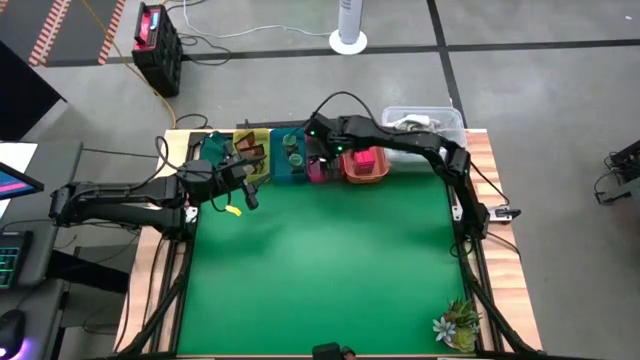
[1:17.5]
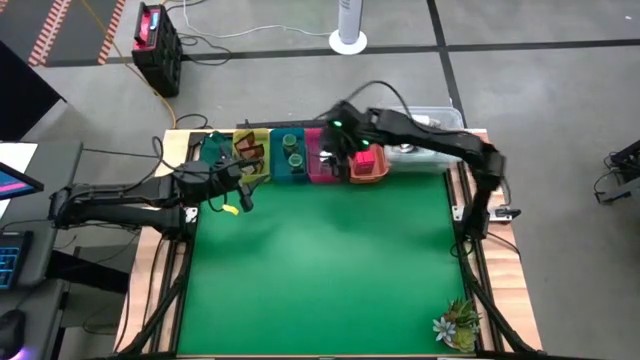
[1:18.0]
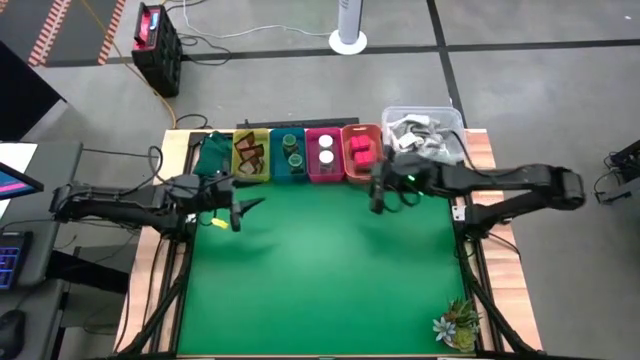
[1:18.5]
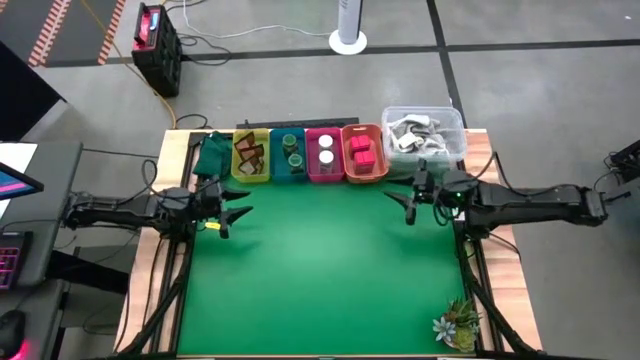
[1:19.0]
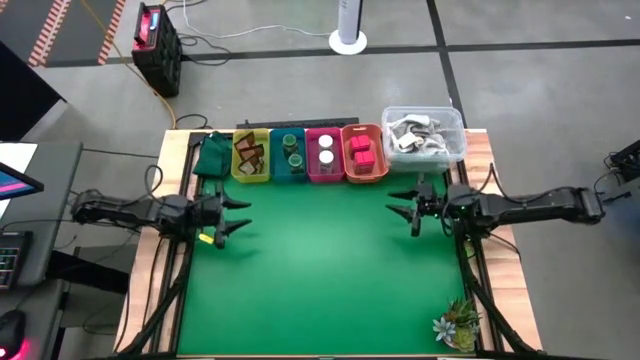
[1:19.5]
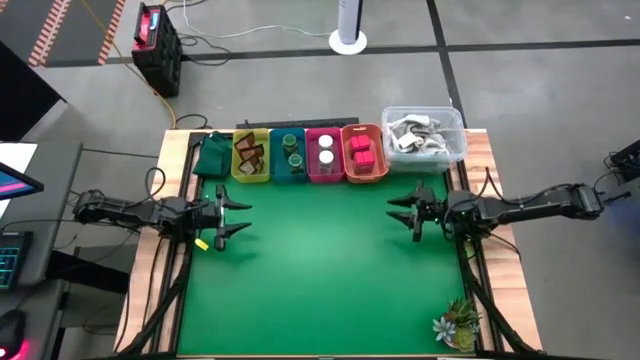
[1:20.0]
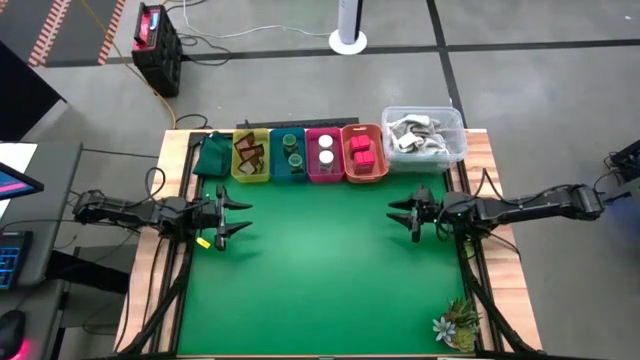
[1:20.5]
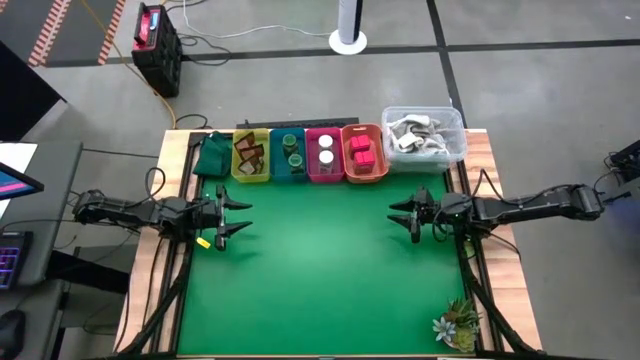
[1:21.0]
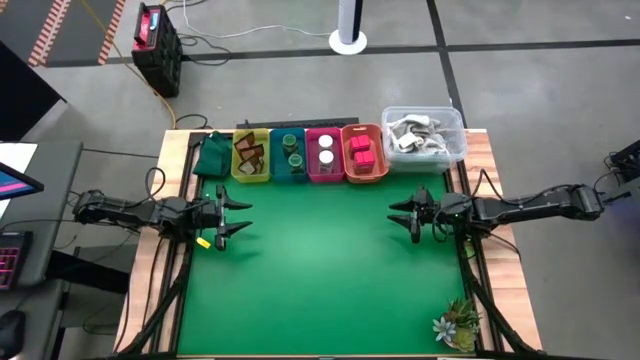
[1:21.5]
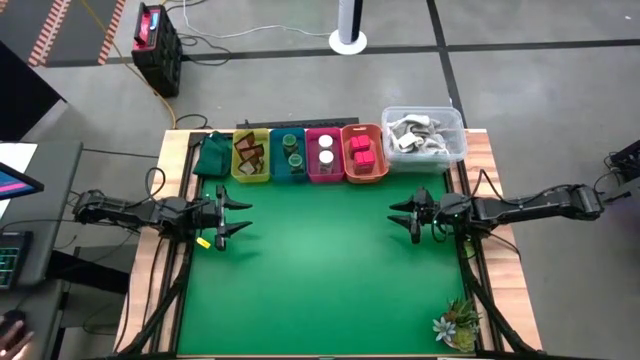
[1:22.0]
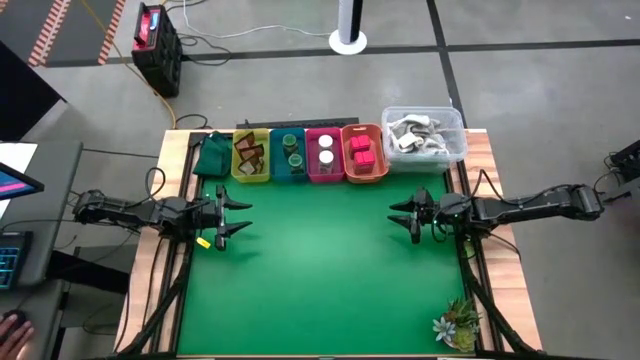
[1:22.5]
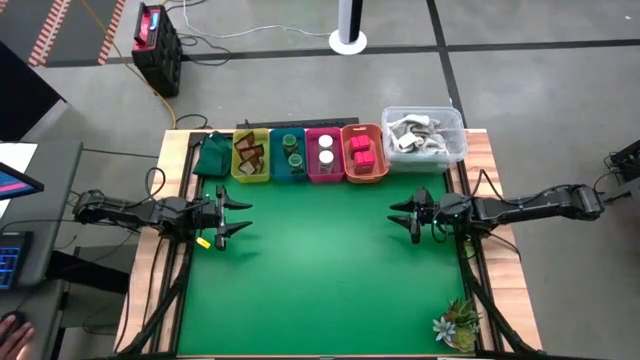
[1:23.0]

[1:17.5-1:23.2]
Task: Sort spices by type
Return to Home Position

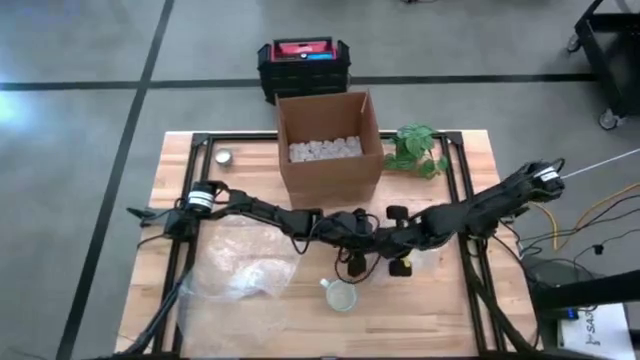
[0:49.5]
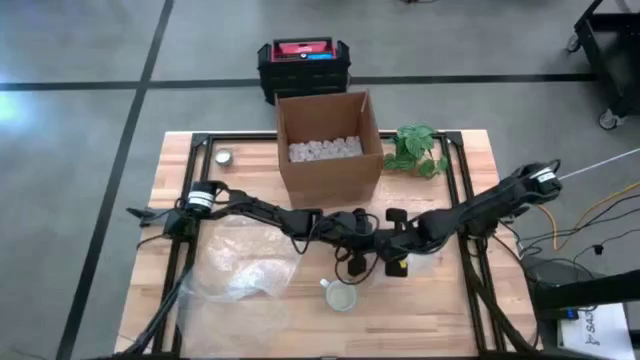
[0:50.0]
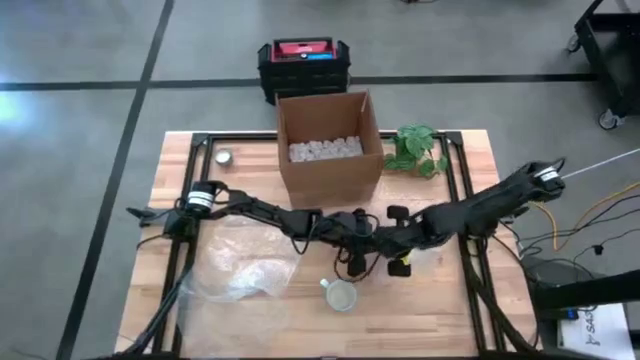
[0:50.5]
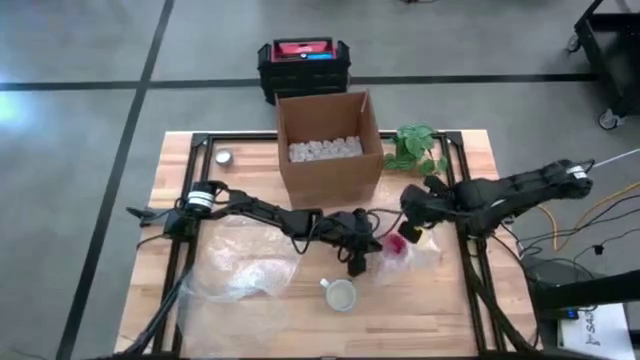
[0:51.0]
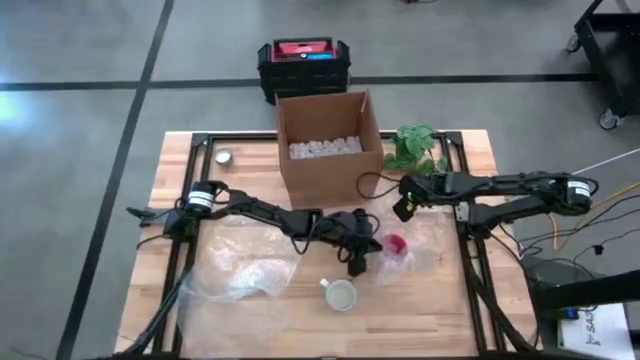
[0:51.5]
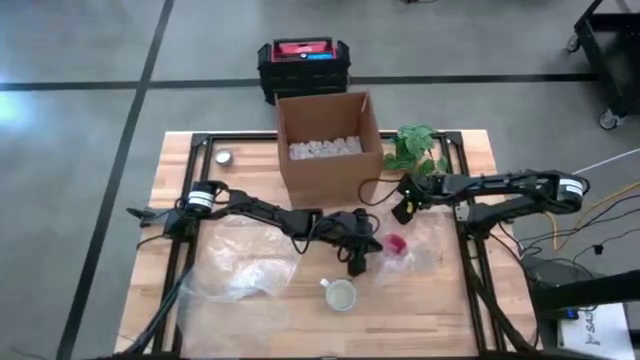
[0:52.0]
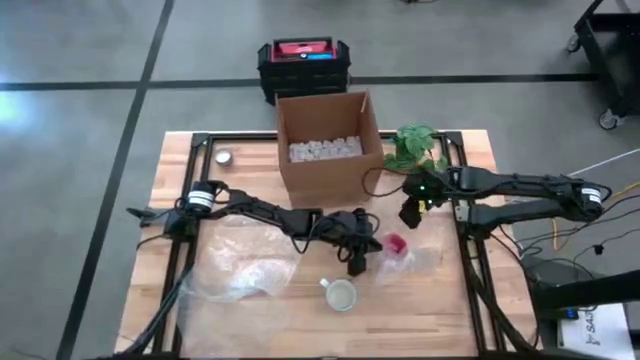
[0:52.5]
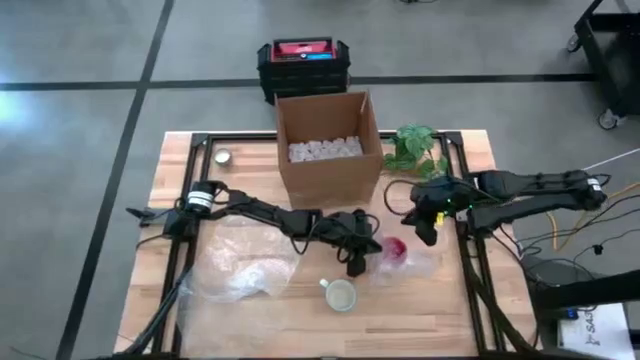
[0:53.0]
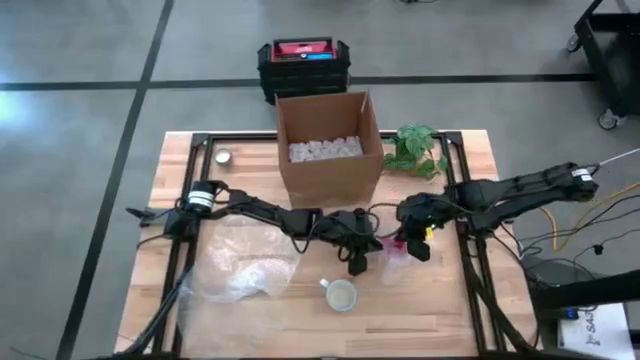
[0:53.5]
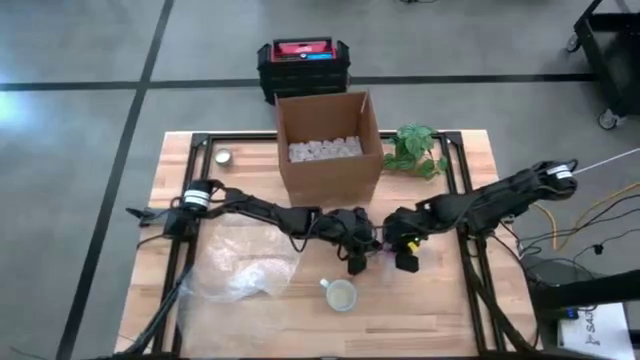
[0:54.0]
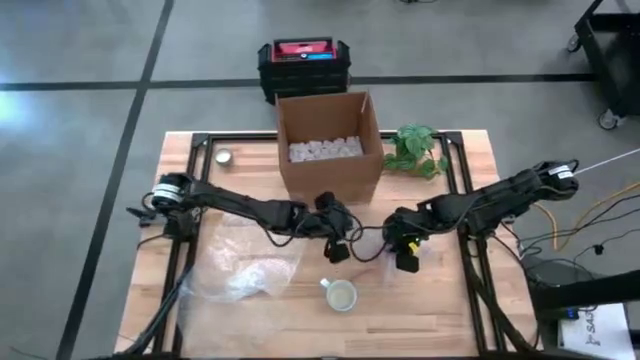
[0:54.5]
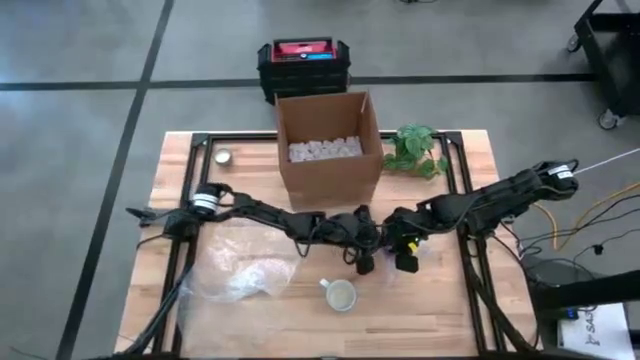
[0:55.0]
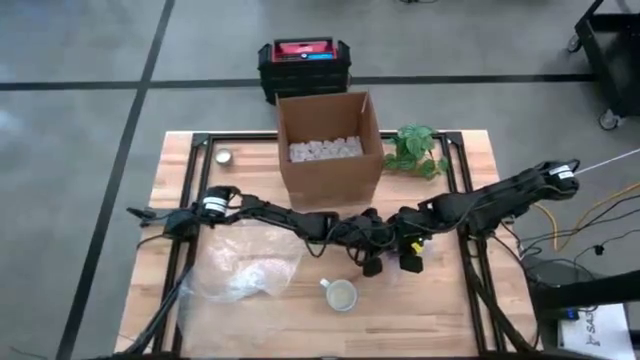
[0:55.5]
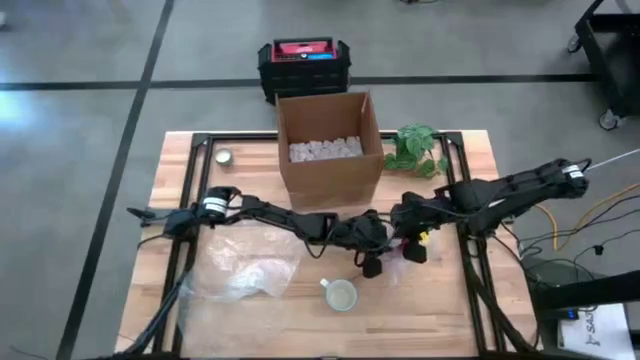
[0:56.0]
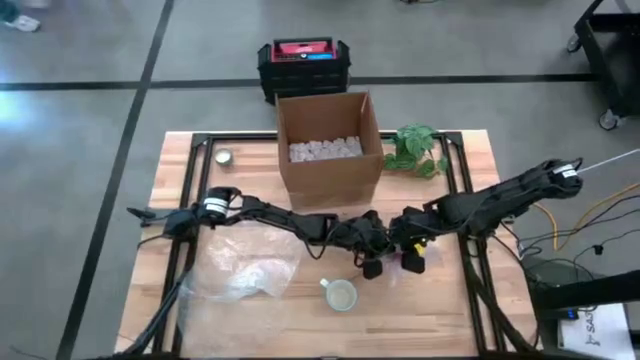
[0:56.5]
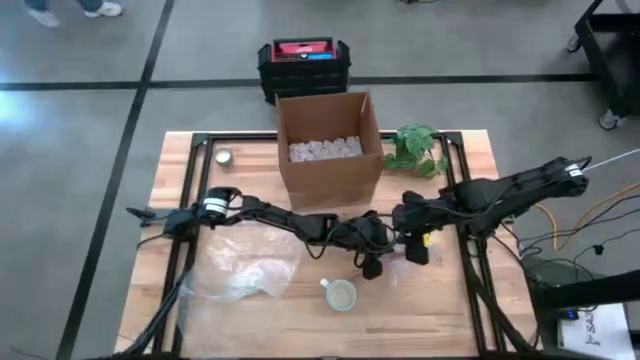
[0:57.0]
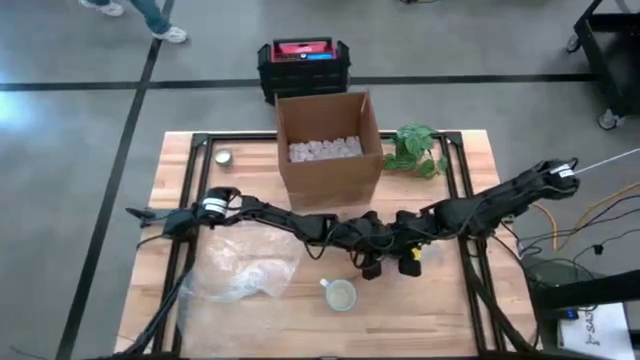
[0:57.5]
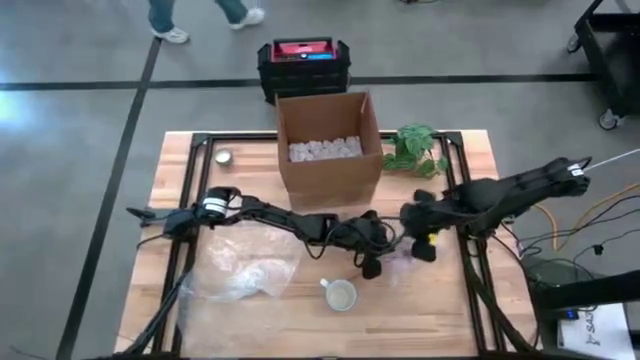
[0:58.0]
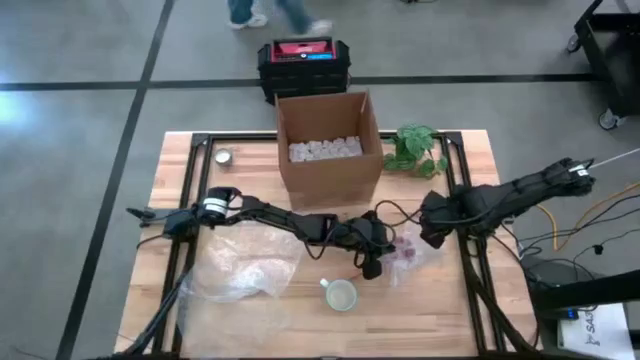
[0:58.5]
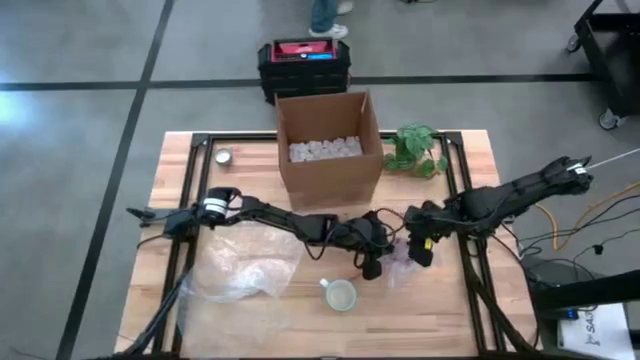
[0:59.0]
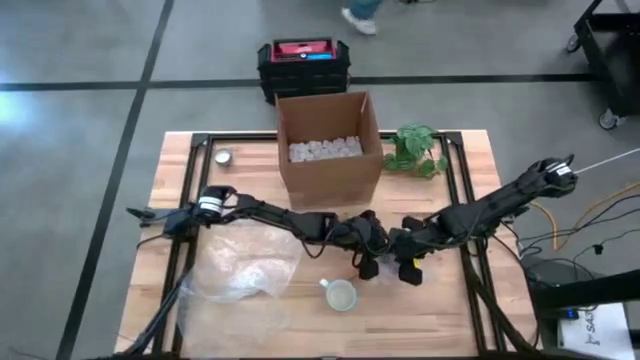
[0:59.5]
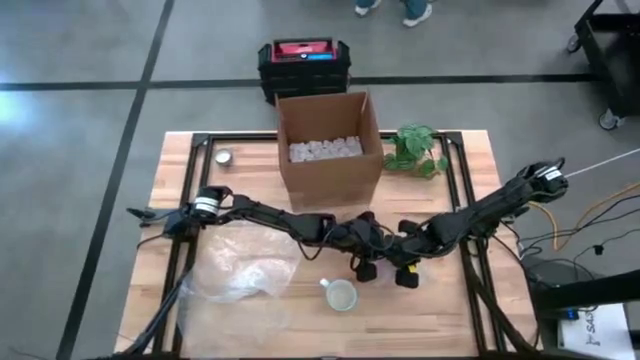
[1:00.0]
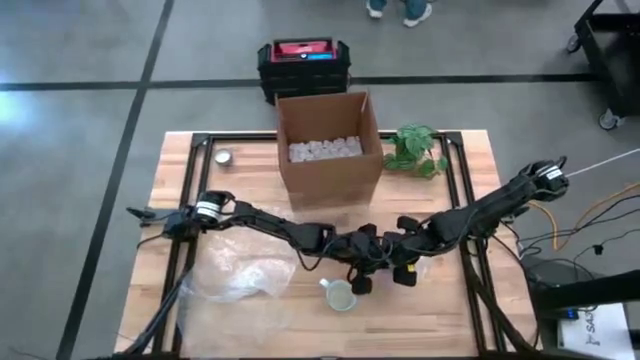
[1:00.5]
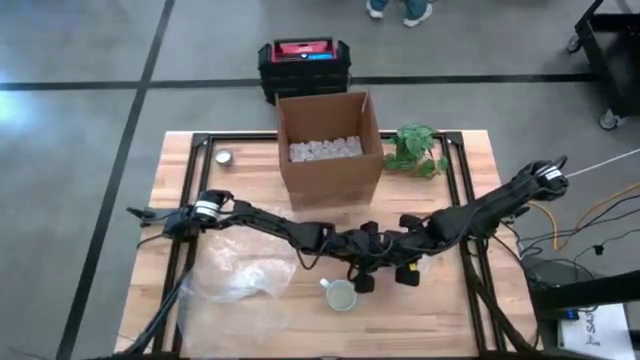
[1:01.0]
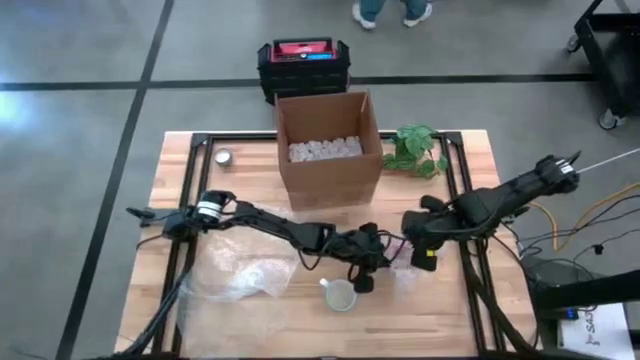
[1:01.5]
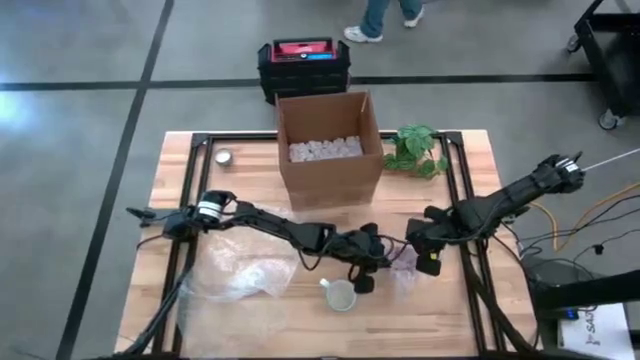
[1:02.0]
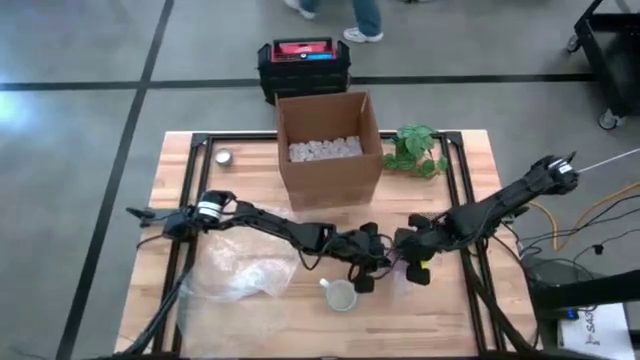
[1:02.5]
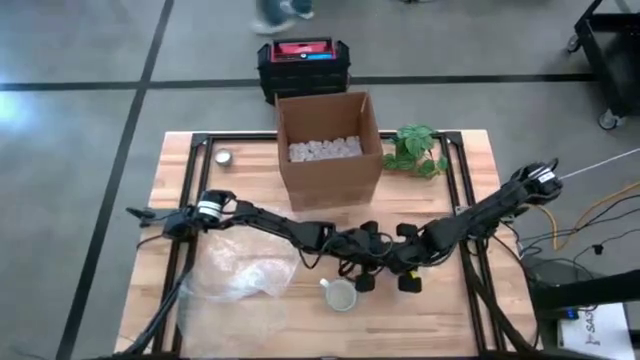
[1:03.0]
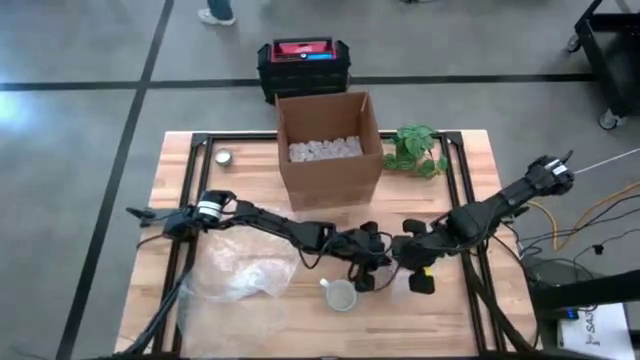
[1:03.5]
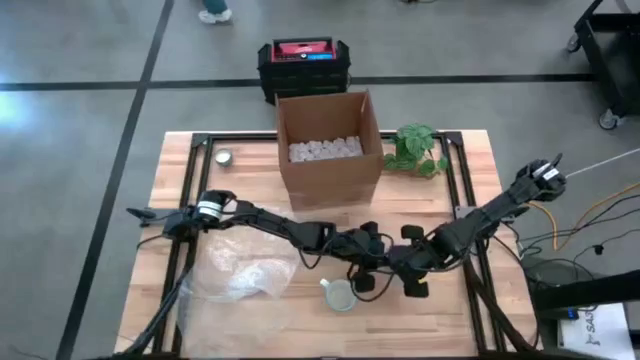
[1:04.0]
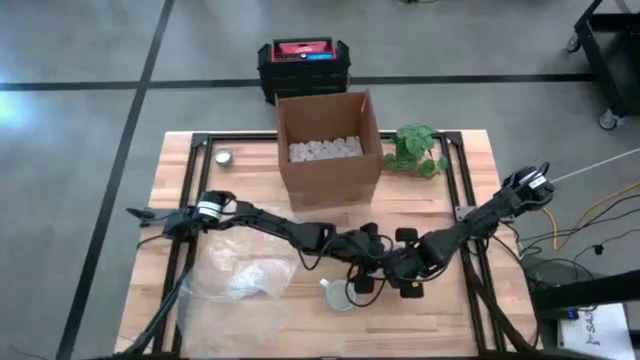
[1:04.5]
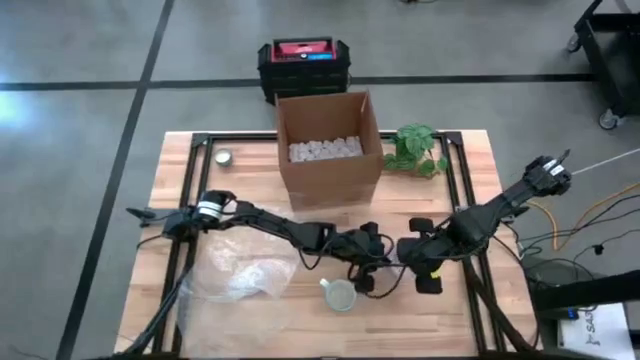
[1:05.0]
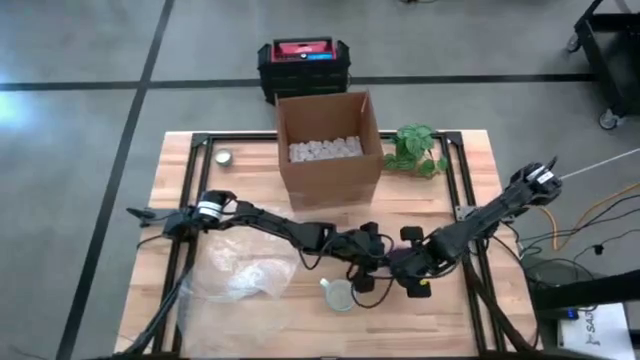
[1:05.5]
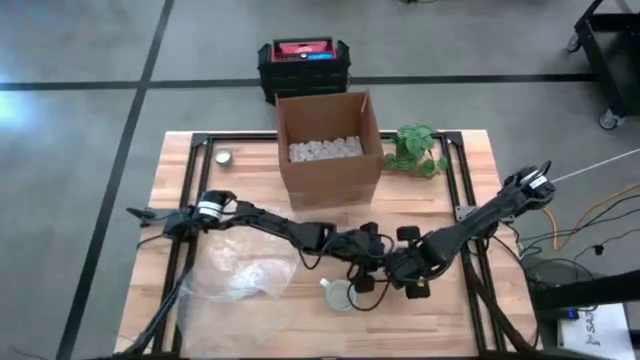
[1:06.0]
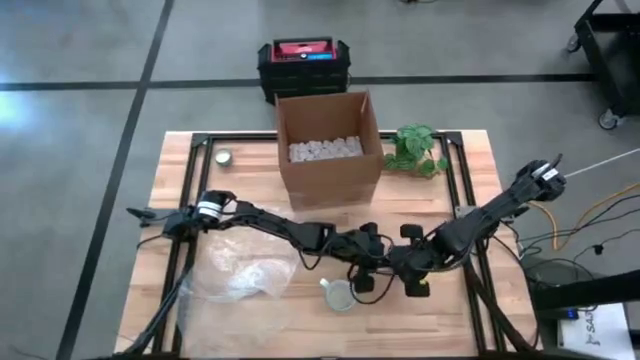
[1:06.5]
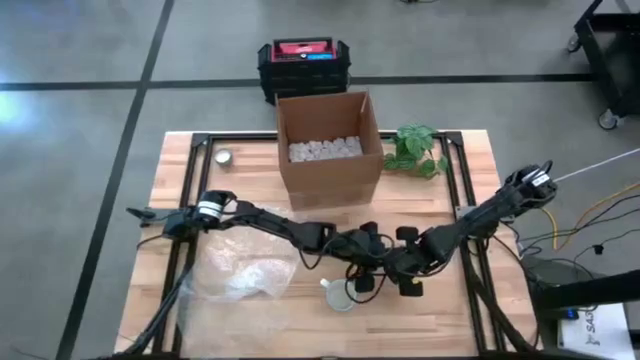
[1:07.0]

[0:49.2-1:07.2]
Task: wrap mug
Wrap the orange mug in bubble wrap
